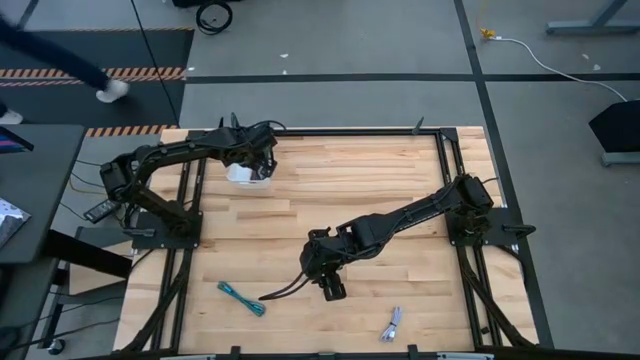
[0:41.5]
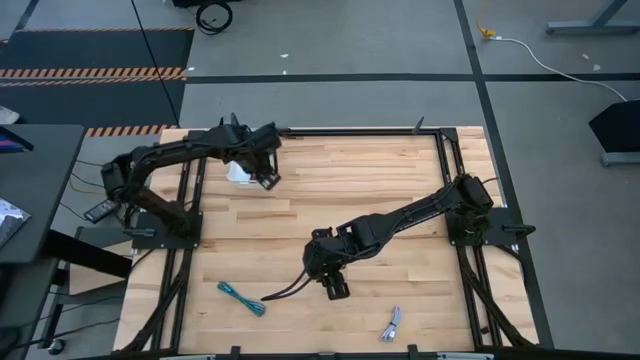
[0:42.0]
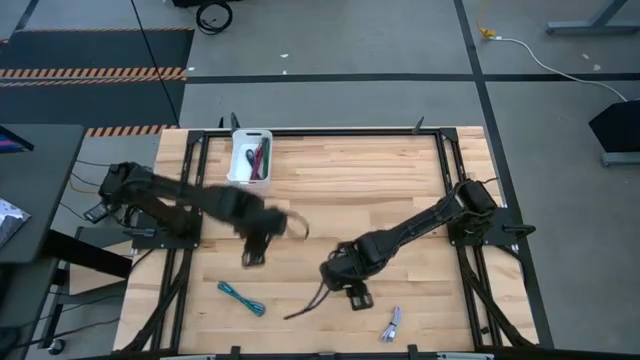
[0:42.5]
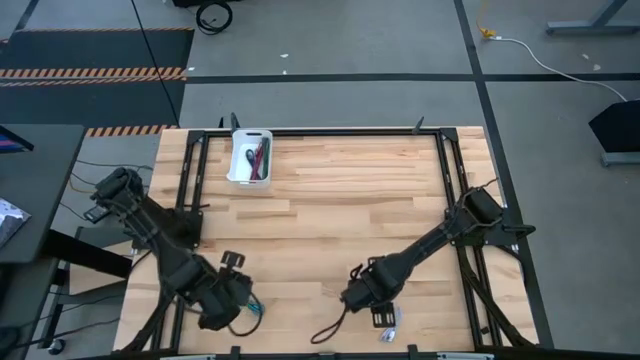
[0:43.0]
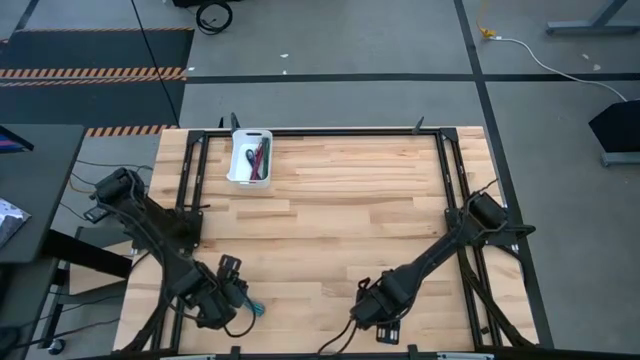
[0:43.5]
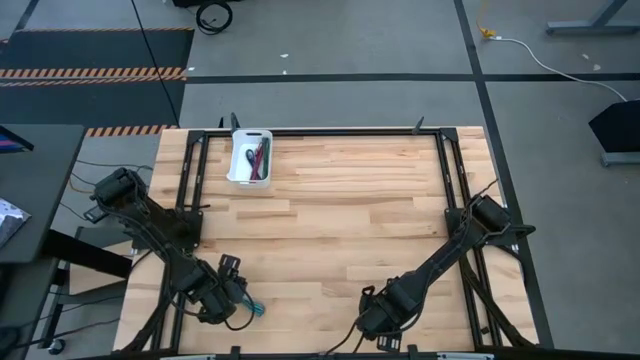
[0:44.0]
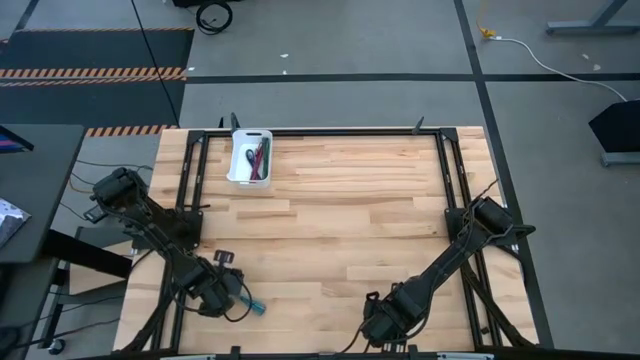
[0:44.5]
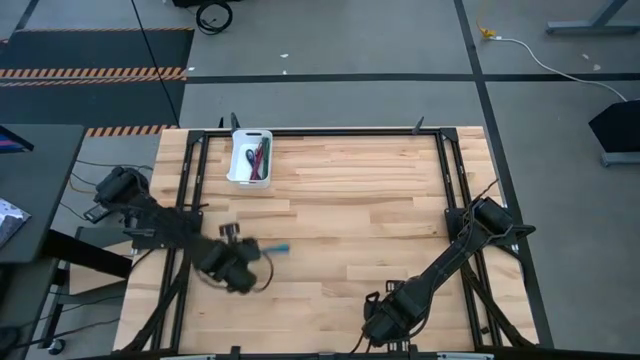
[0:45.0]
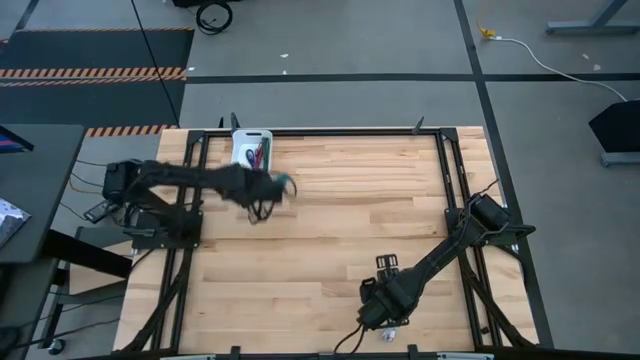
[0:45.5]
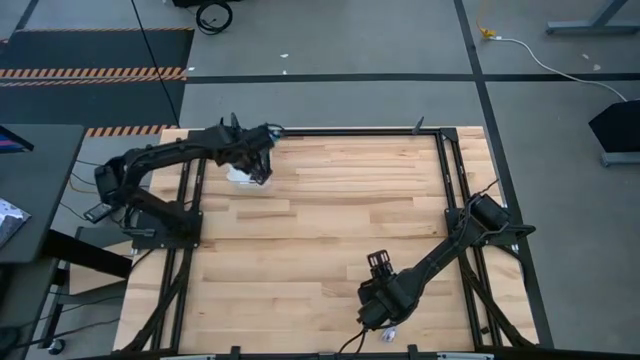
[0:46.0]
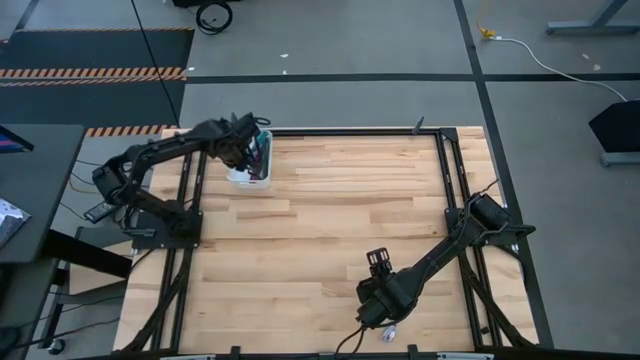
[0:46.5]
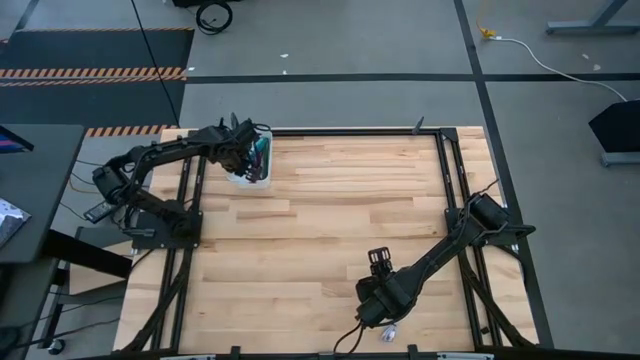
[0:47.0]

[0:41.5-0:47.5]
Task: Pick and place USB-C Cables
Put the blue charger cable into the white bin

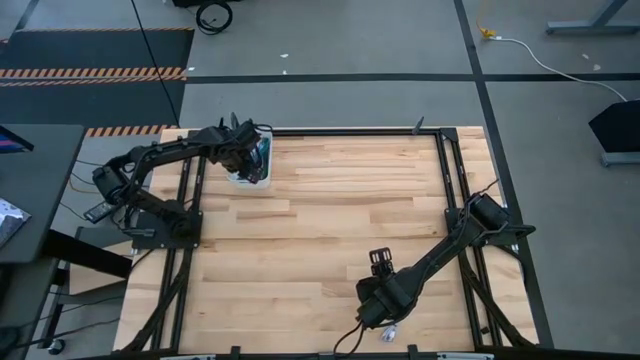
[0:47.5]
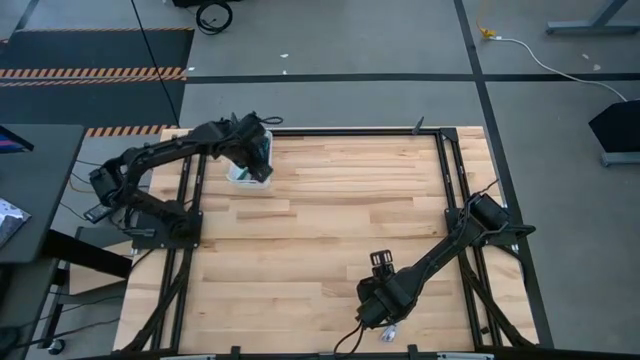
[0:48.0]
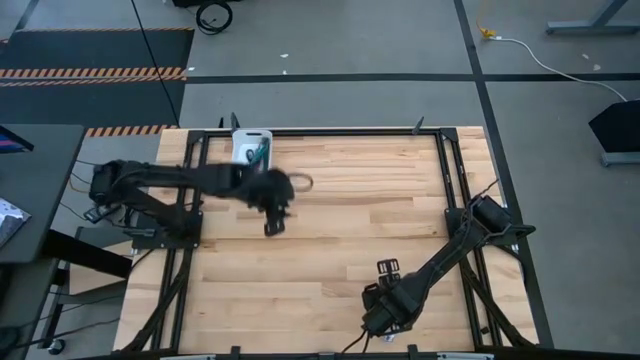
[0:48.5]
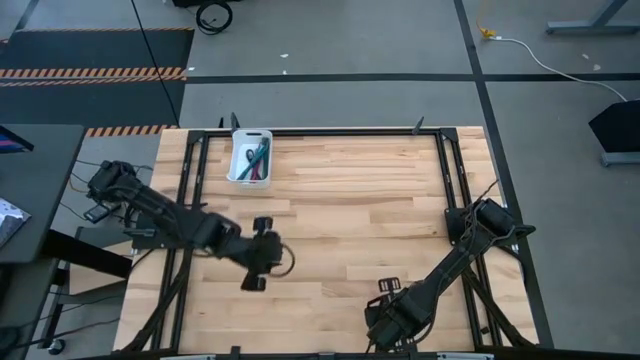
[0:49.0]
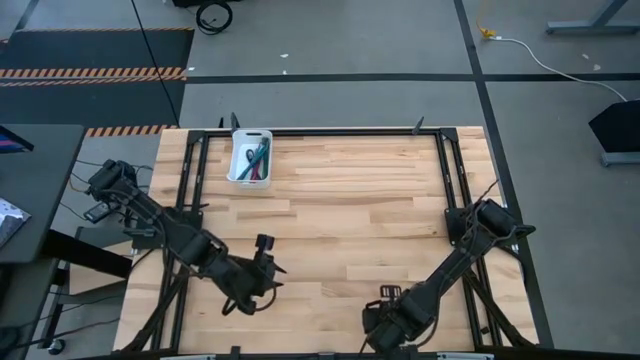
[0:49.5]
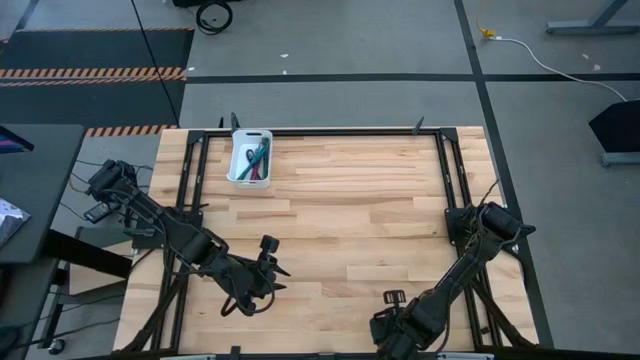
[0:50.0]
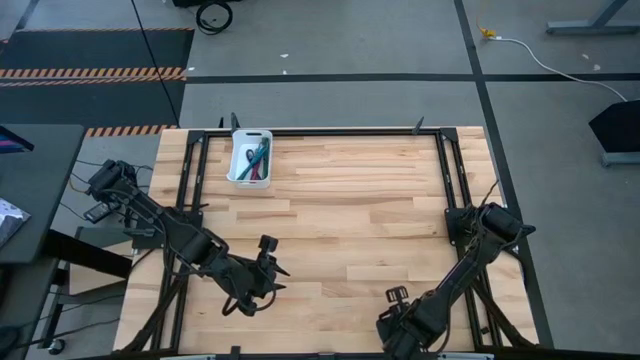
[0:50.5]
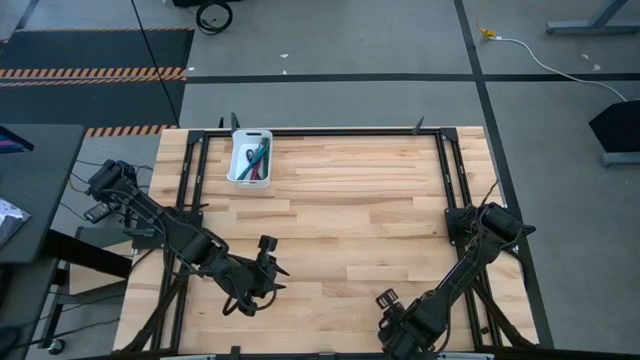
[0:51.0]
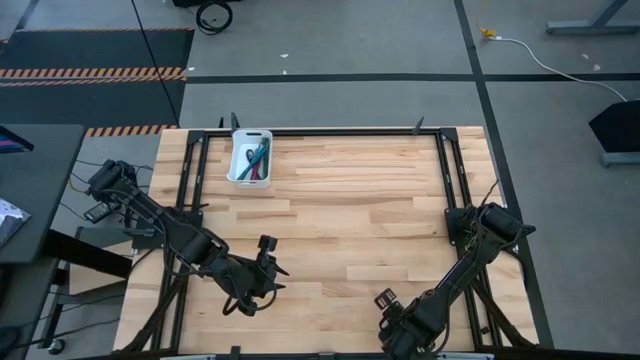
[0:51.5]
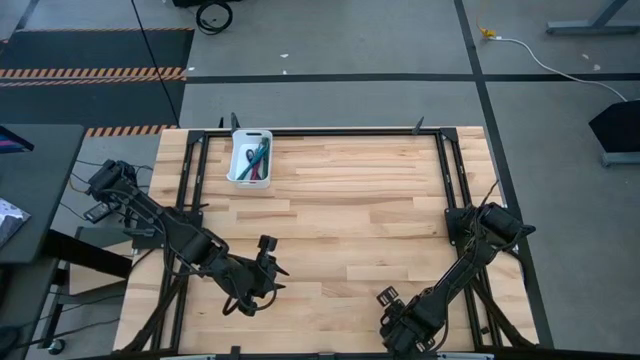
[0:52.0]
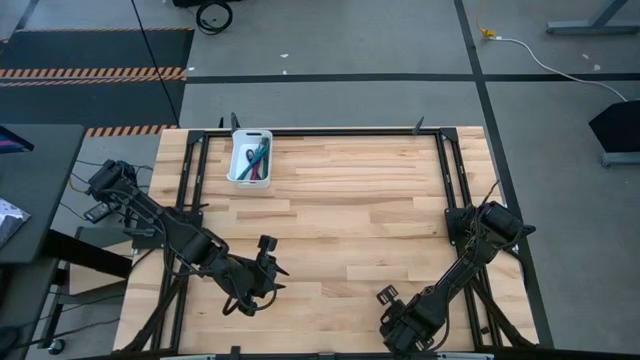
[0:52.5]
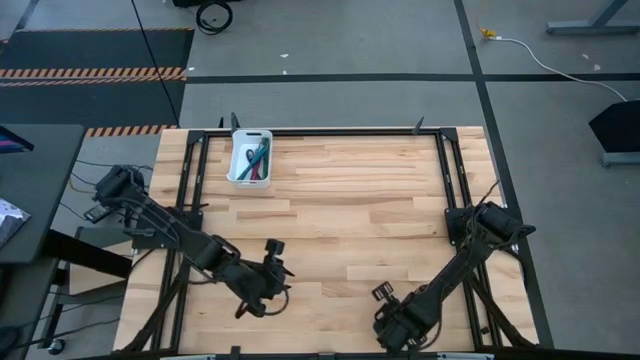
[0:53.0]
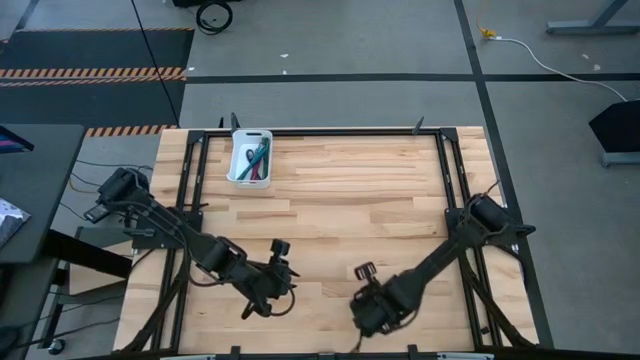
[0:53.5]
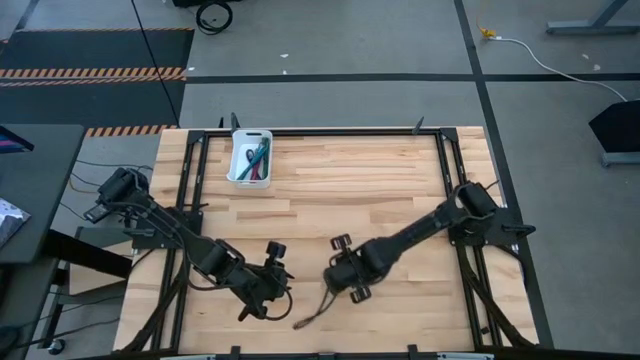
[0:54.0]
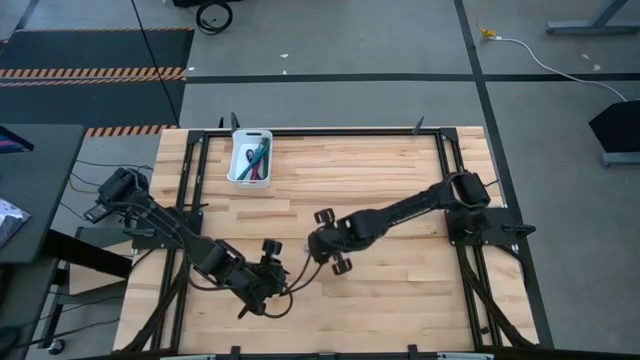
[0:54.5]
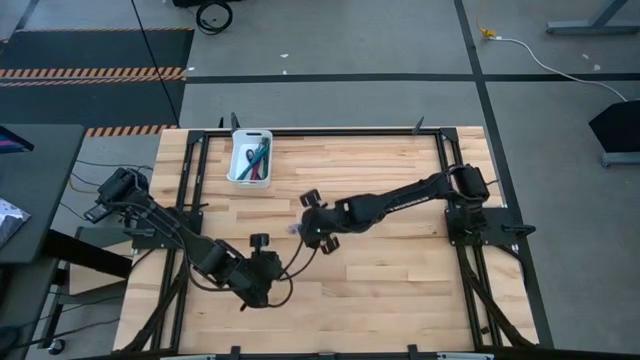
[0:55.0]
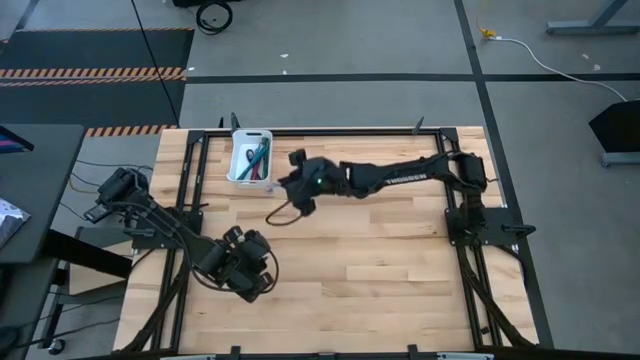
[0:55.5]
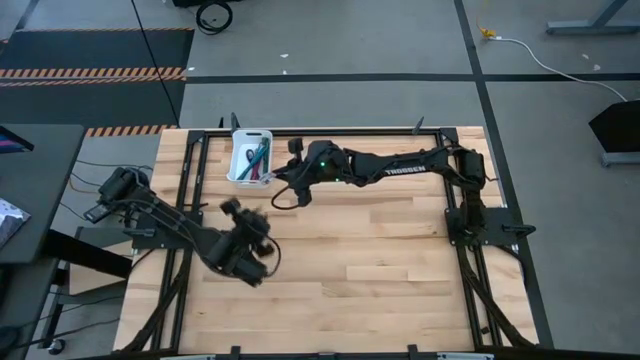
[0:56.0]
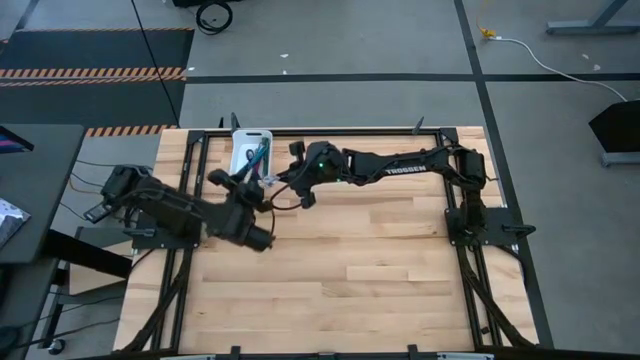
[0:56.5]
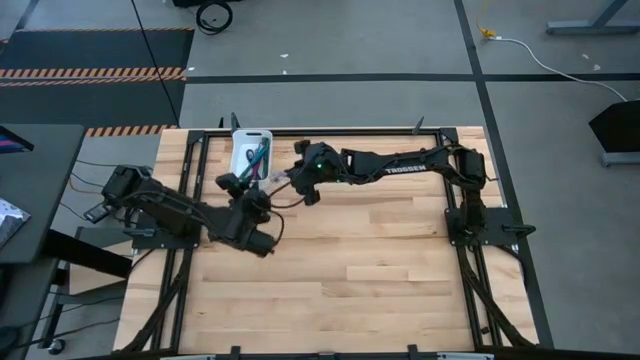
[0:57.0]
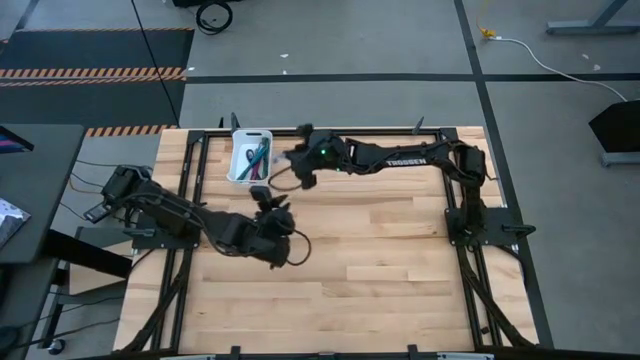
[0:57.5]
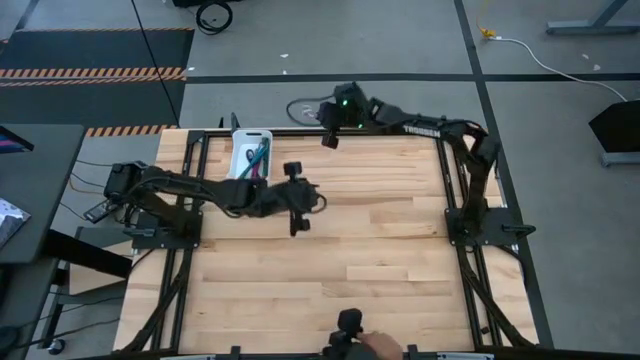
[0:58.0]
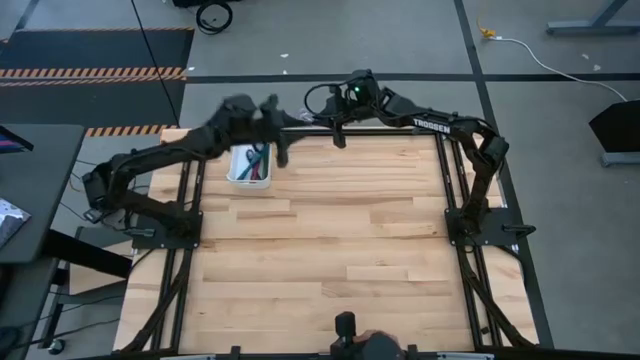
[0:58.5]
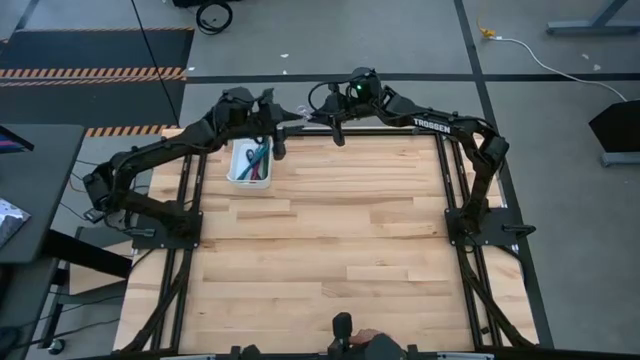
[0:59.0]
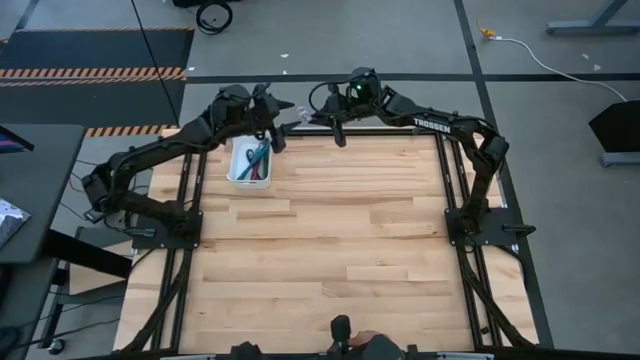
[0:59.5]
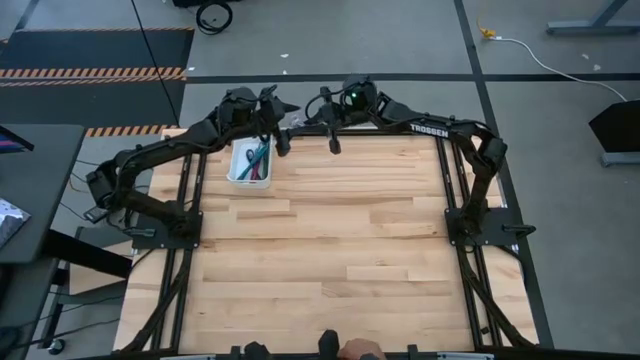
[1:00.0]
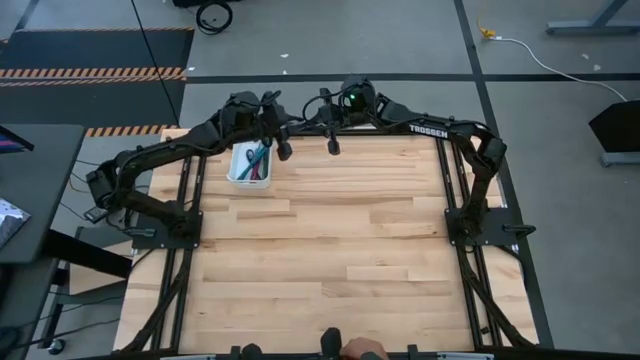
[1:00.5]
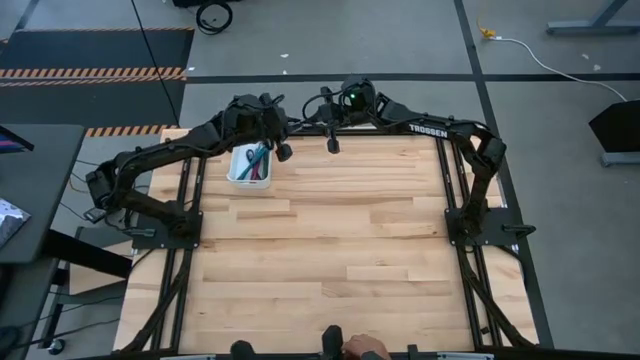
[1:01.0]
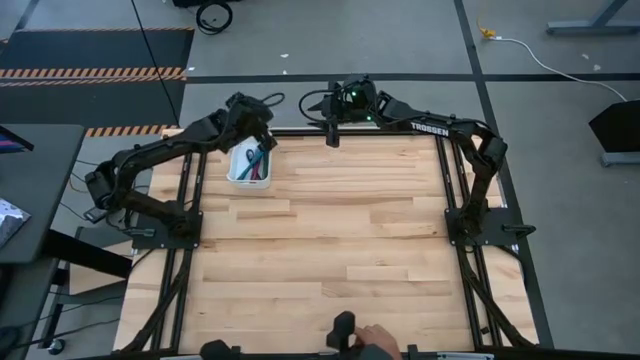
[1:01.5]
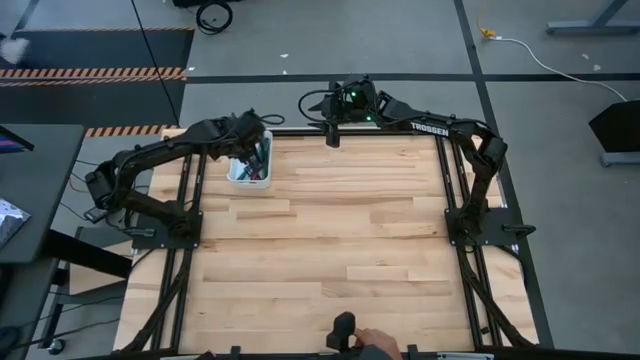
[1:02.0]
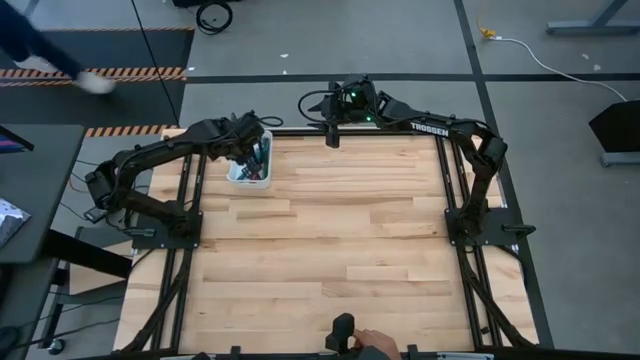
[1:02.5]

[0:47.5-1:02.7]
Put the white charger cable into the white bin
